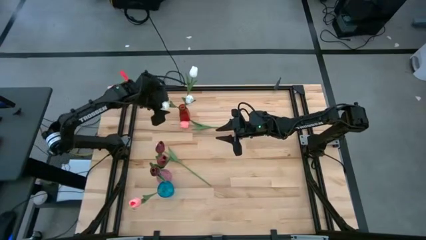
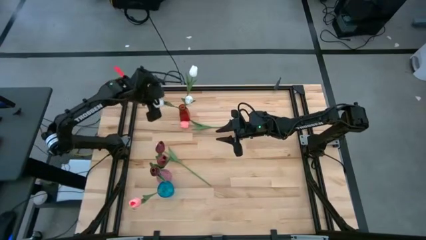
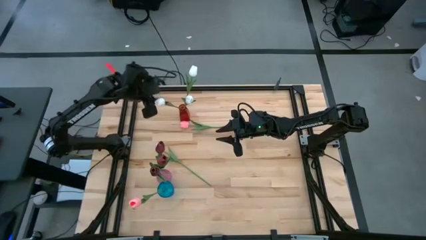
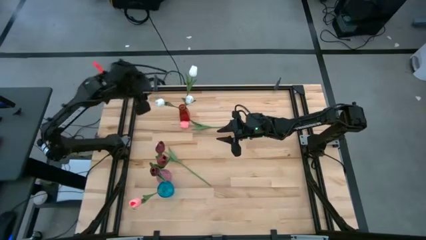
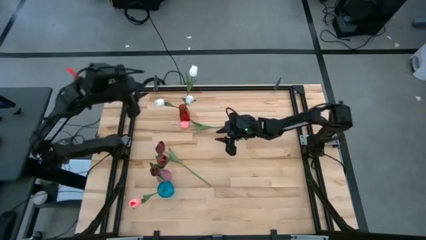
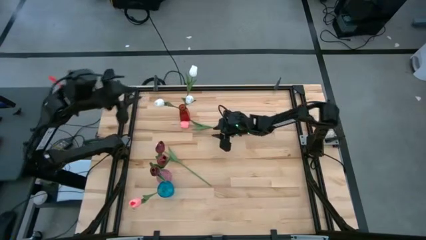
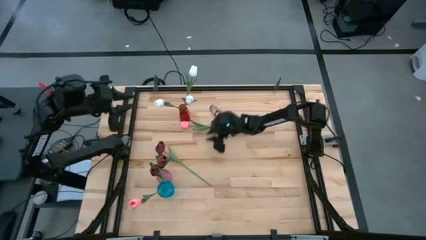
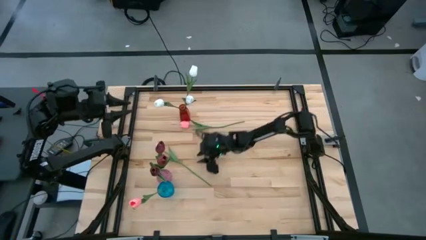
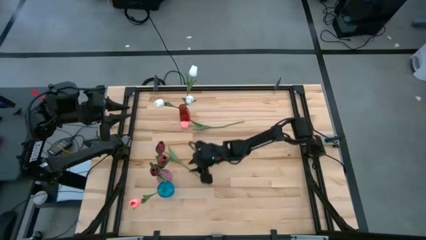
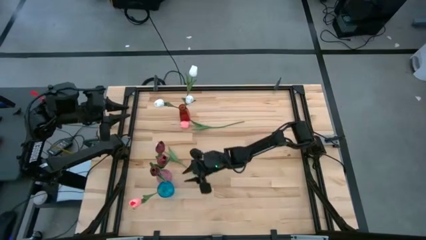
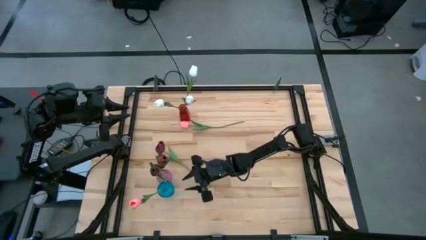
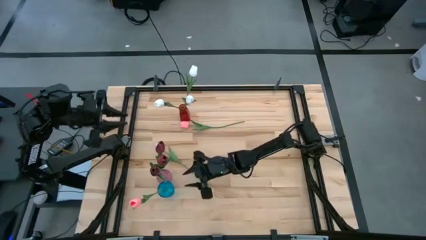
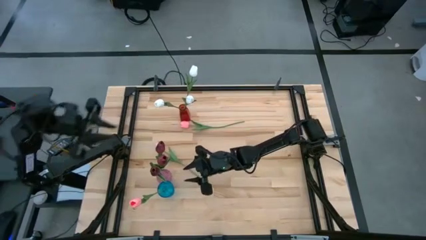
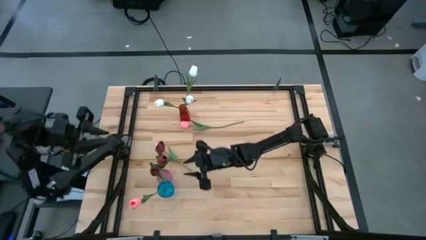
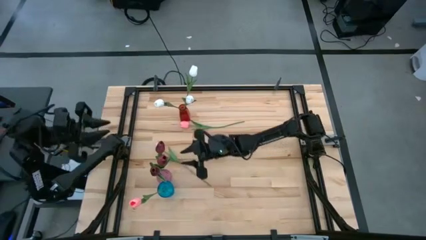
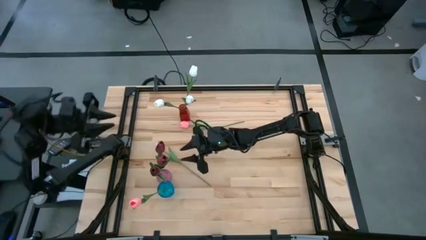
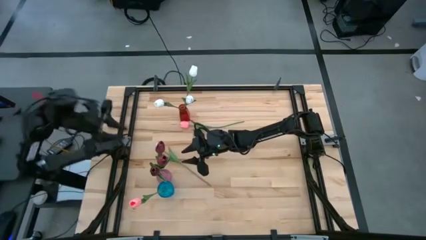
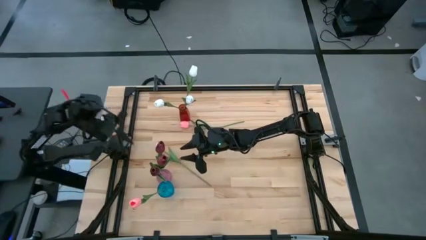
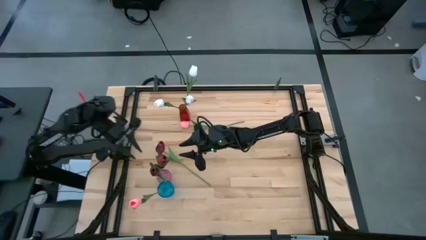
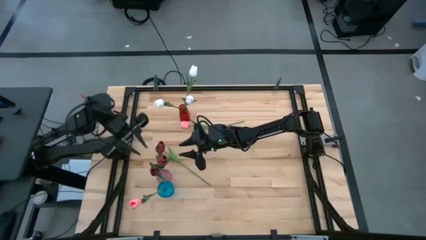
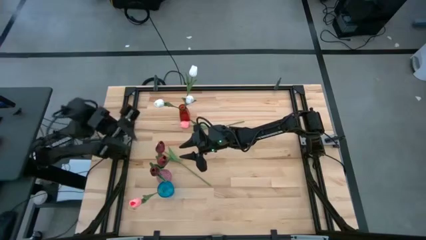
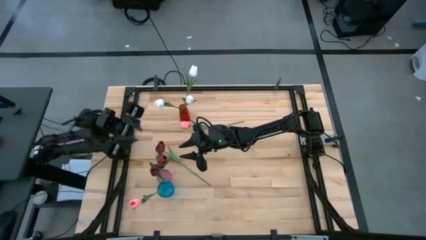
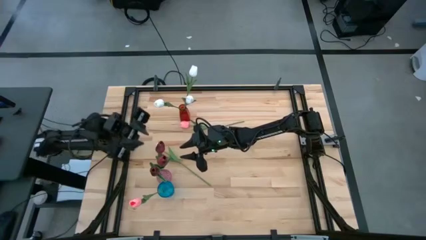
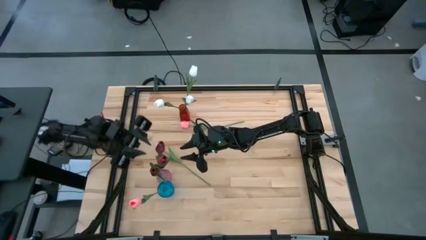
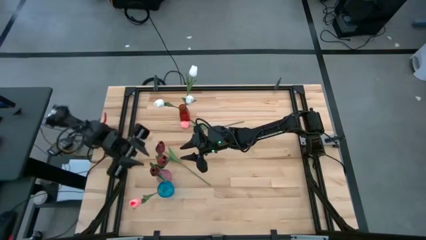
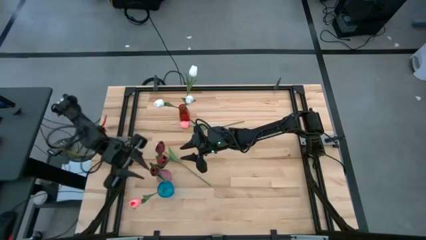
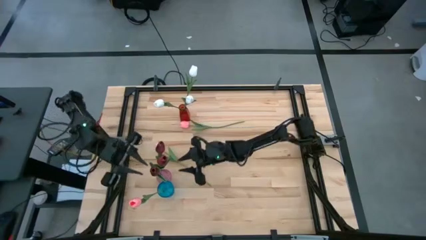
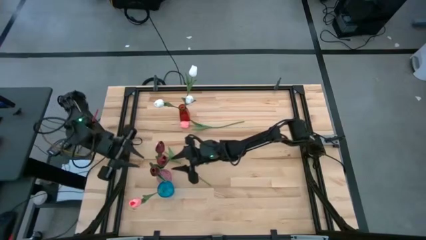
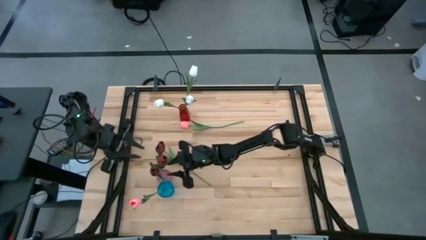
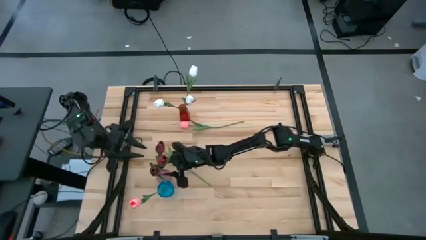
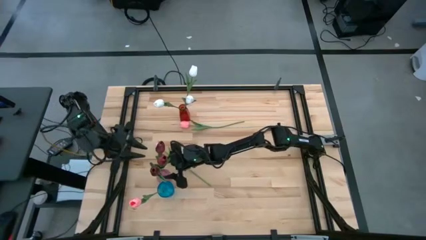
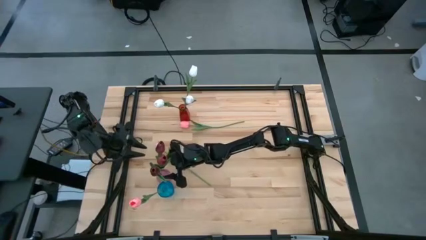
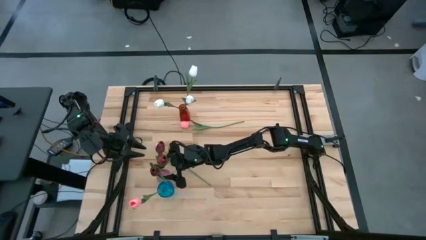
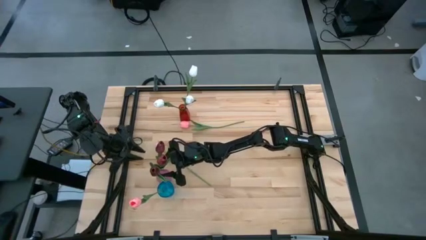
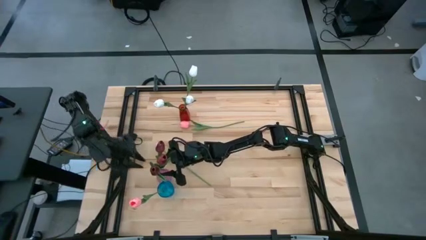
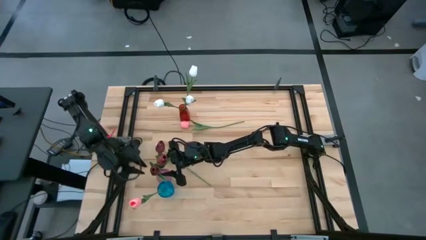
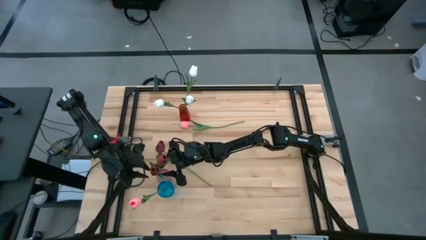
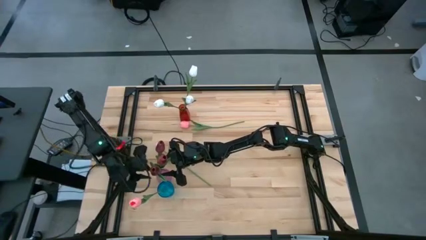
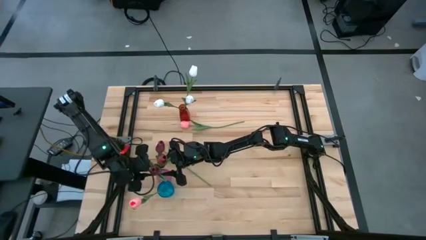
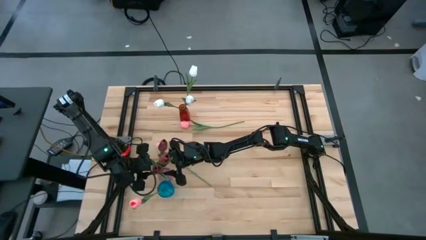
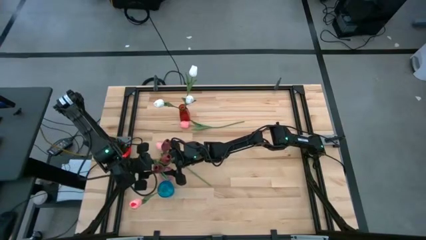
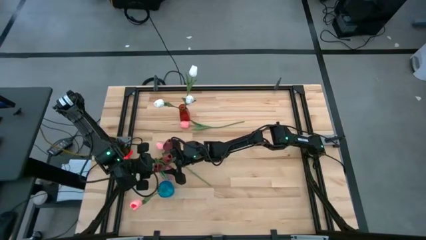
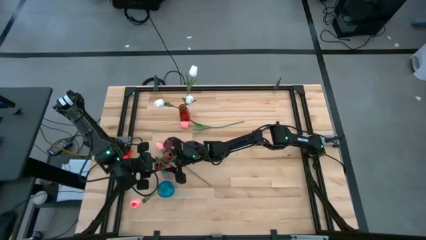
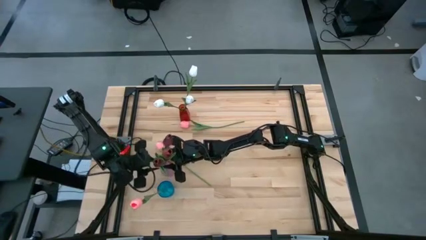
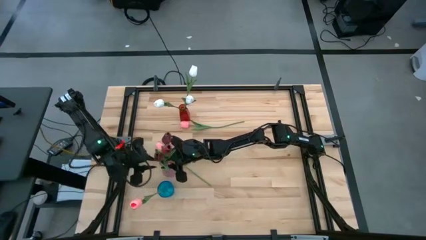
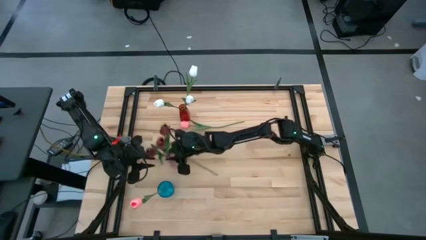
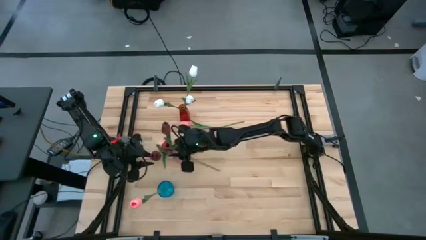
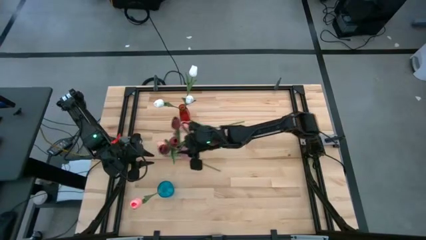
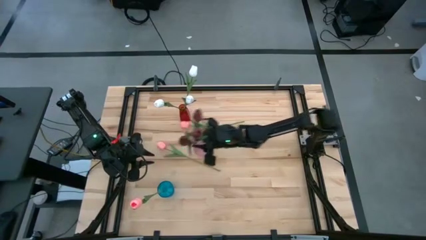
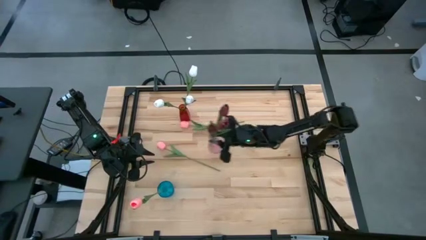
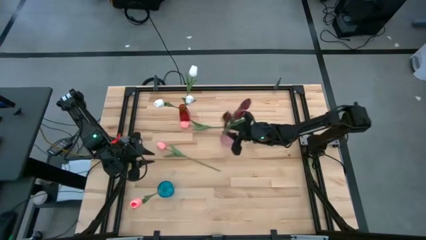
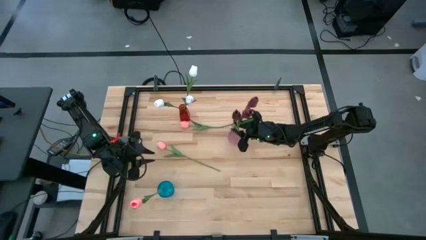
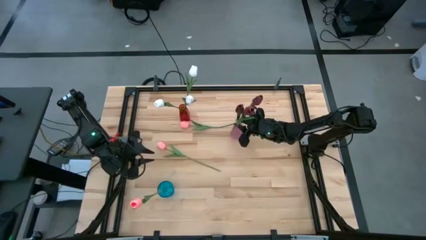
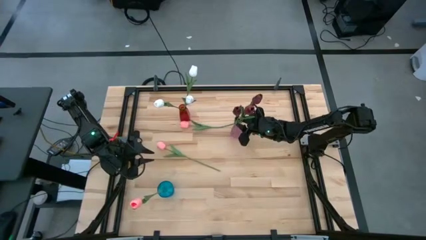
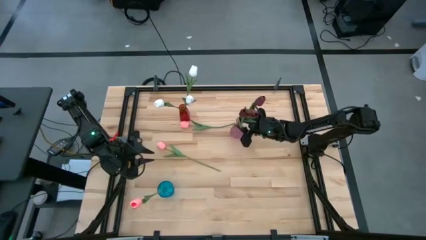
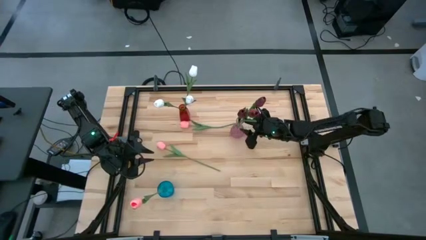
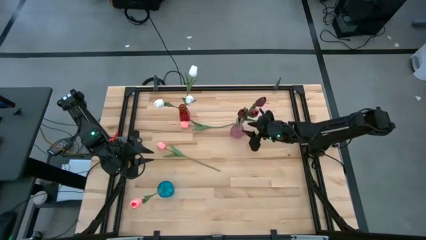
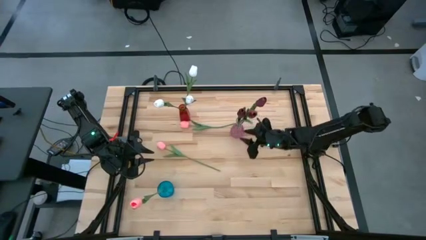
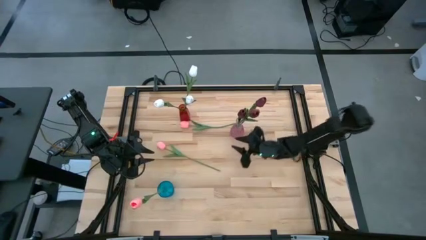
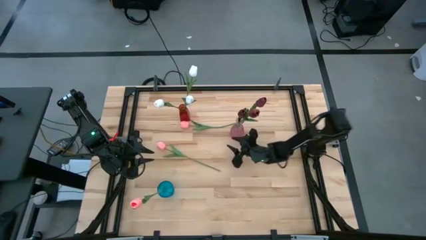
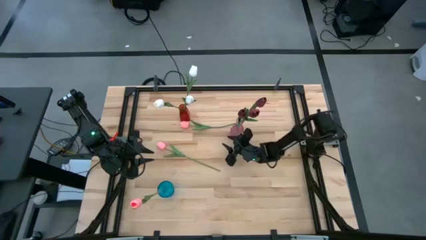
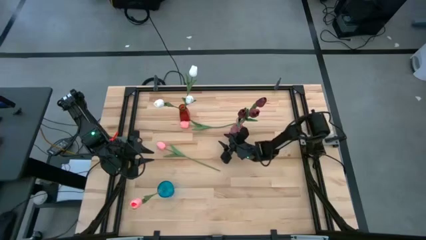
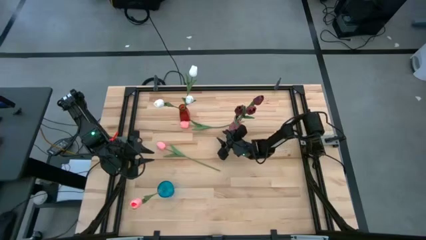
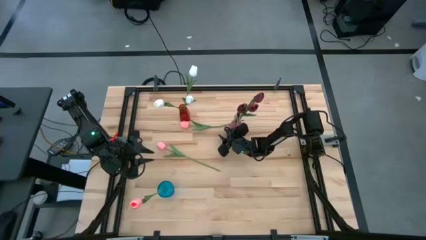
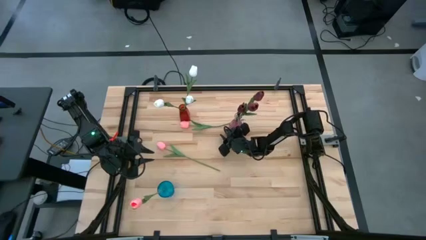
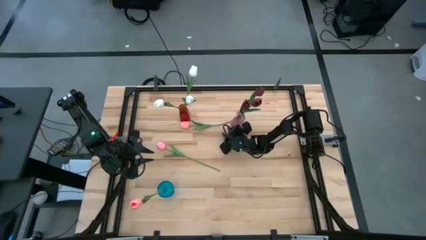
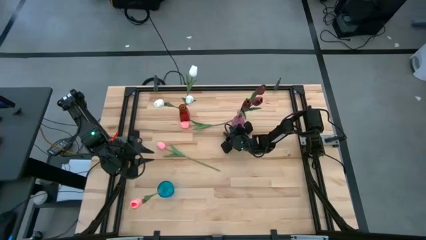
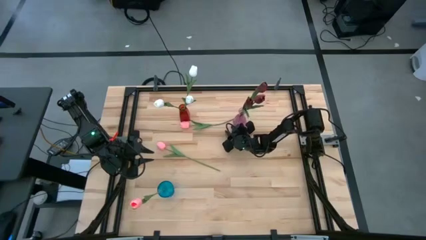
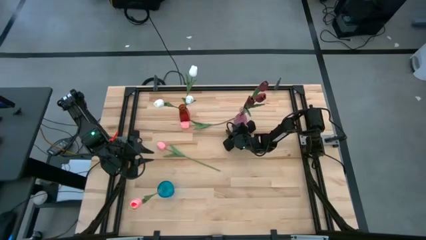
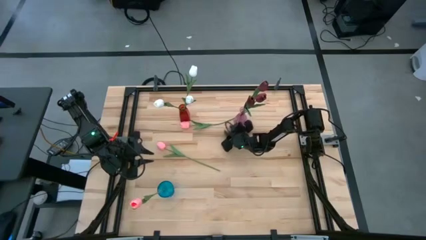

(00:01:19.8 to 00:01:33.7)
Task: Sort flowers into vase by color
Move the pink vase to the top right of the table
